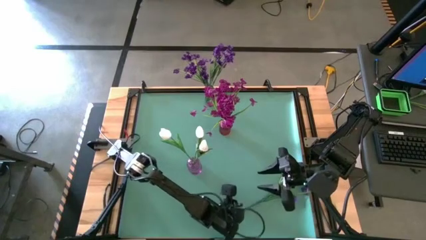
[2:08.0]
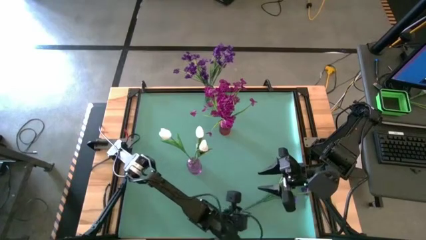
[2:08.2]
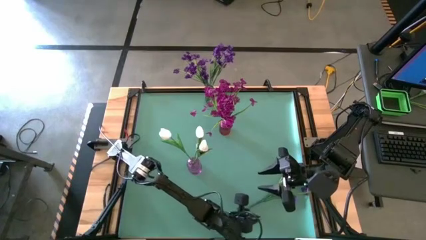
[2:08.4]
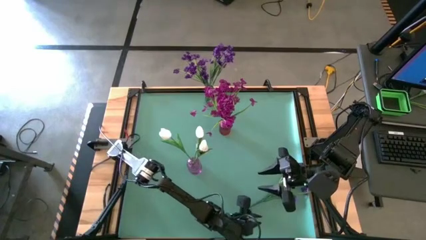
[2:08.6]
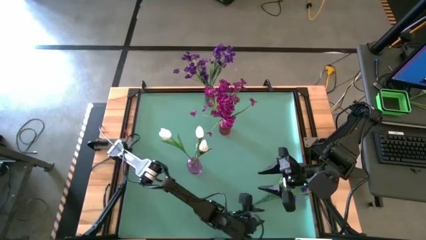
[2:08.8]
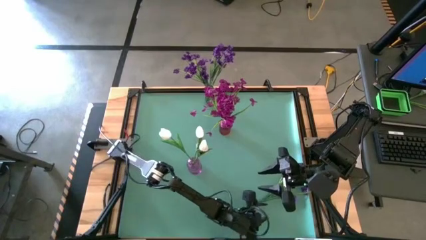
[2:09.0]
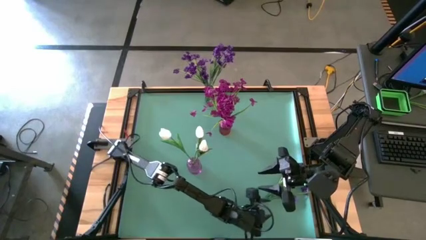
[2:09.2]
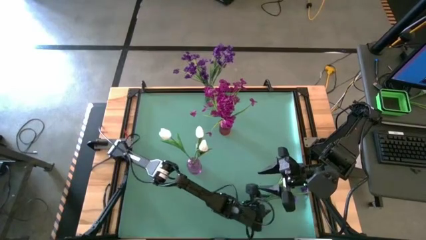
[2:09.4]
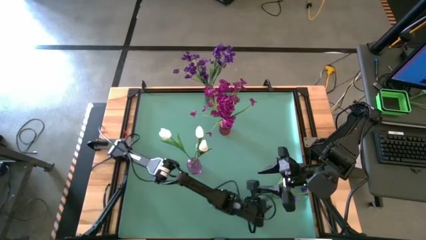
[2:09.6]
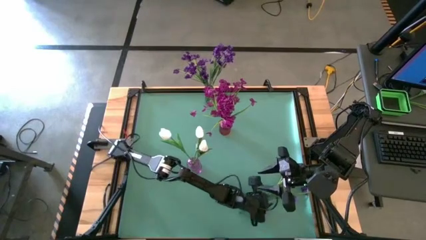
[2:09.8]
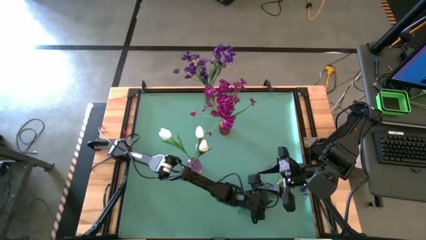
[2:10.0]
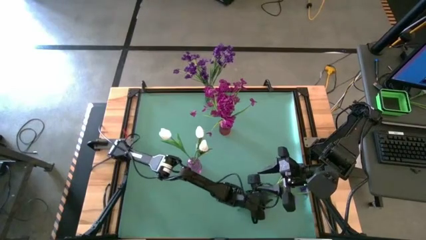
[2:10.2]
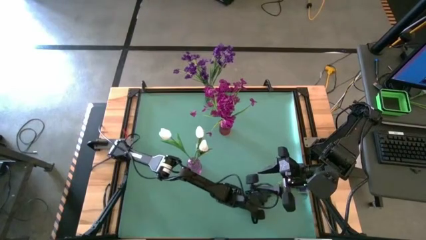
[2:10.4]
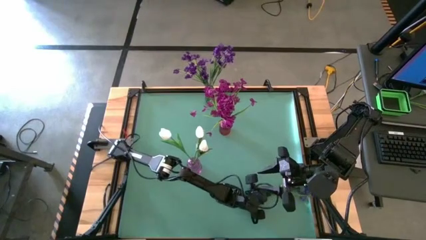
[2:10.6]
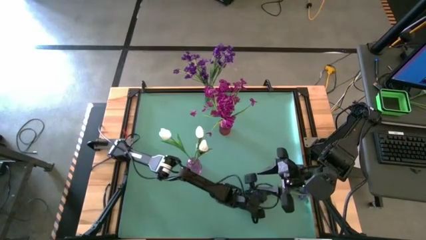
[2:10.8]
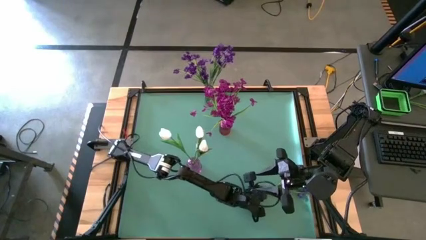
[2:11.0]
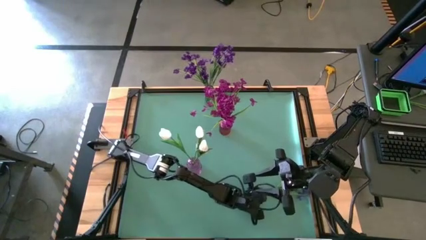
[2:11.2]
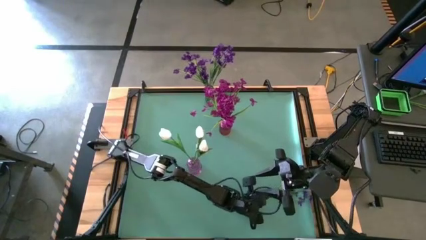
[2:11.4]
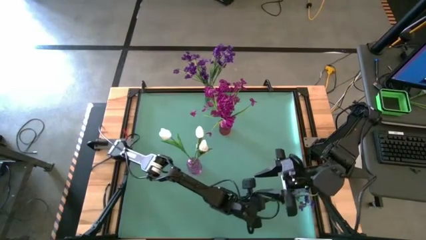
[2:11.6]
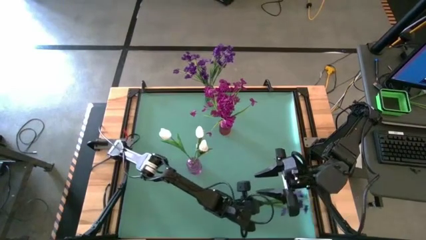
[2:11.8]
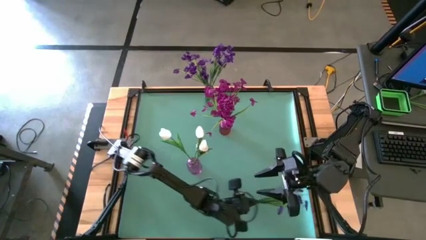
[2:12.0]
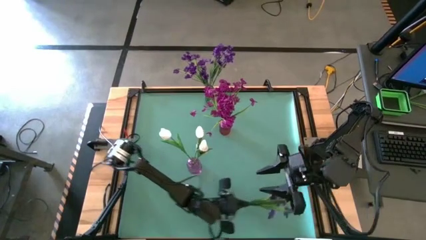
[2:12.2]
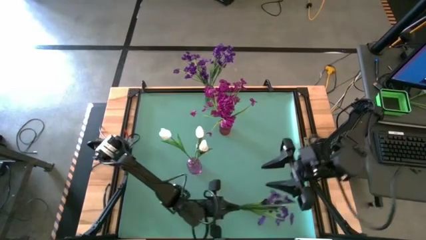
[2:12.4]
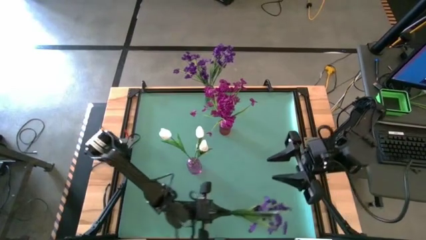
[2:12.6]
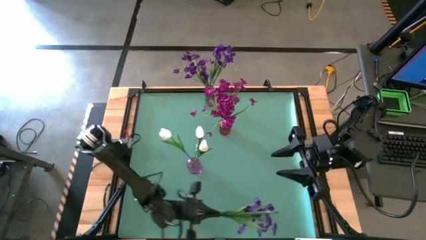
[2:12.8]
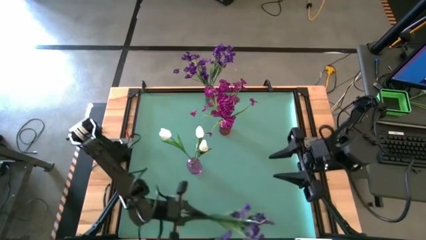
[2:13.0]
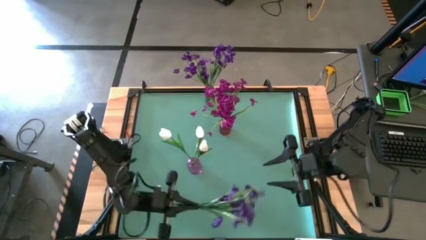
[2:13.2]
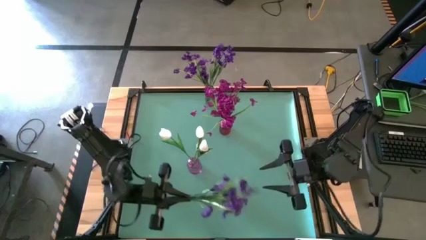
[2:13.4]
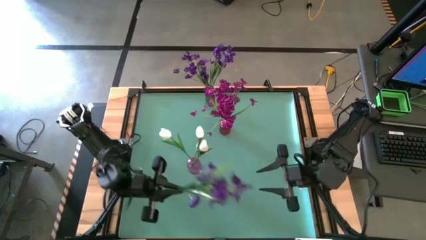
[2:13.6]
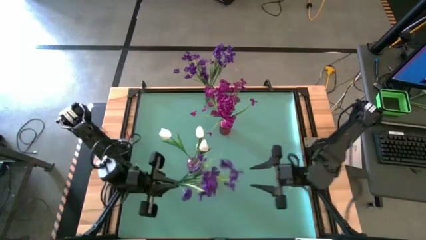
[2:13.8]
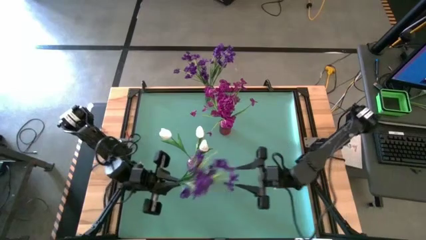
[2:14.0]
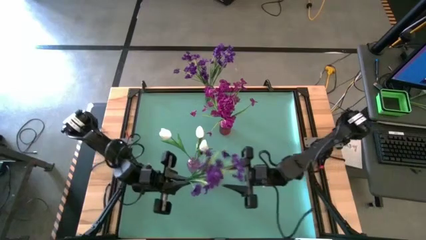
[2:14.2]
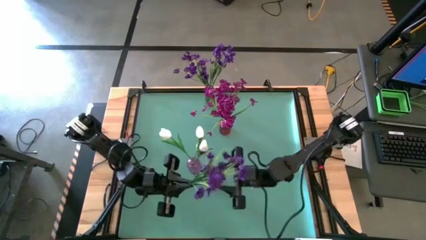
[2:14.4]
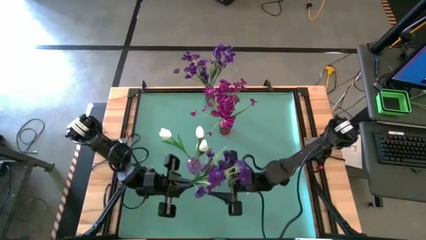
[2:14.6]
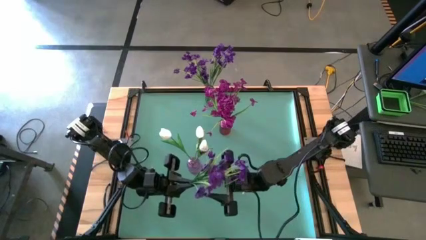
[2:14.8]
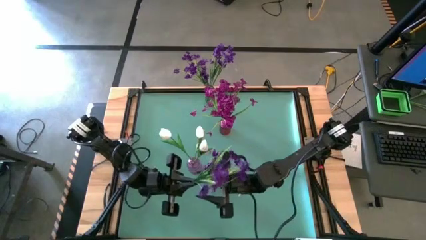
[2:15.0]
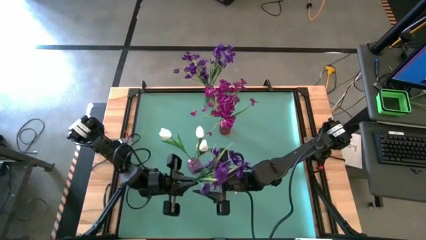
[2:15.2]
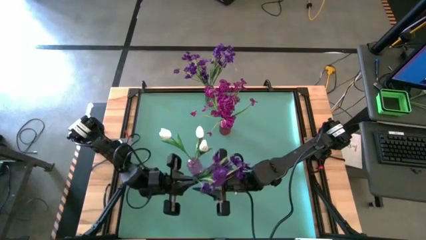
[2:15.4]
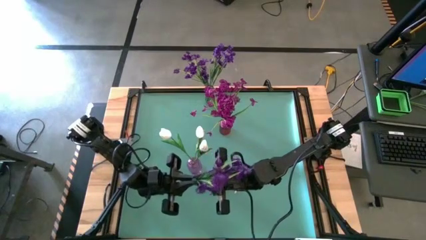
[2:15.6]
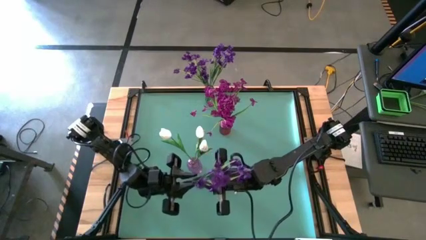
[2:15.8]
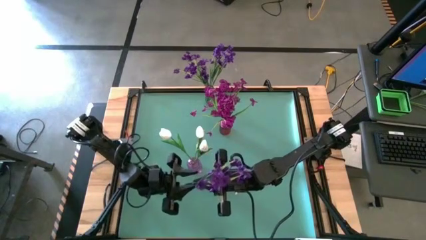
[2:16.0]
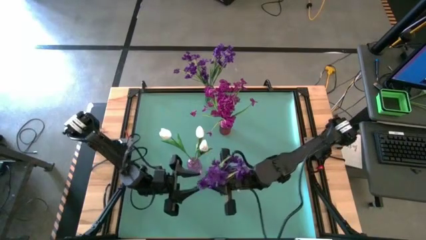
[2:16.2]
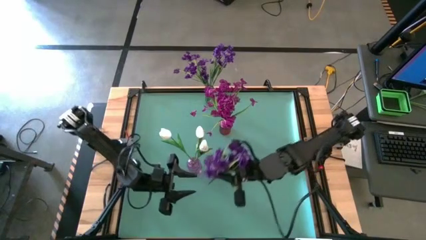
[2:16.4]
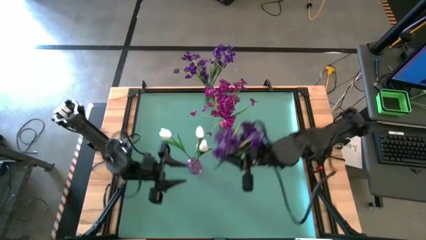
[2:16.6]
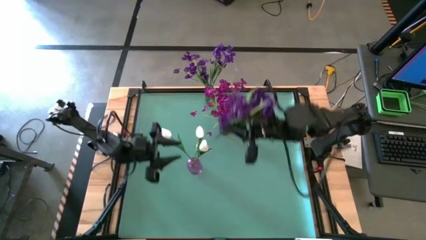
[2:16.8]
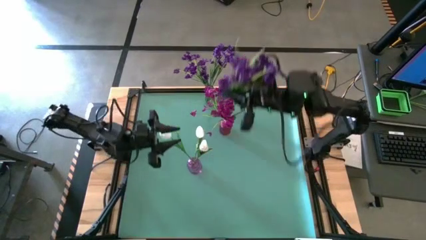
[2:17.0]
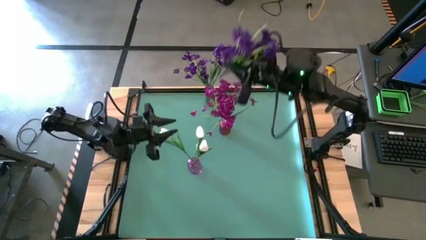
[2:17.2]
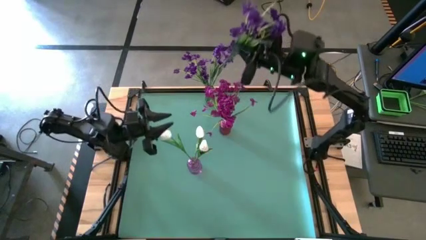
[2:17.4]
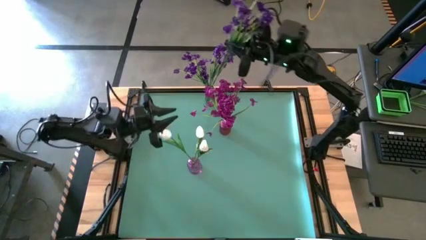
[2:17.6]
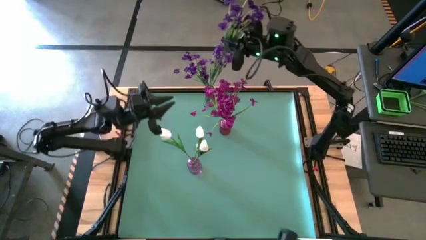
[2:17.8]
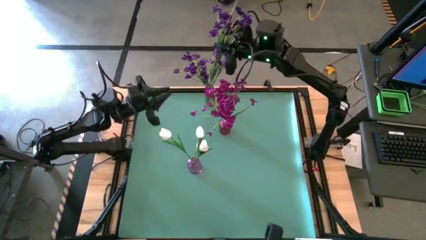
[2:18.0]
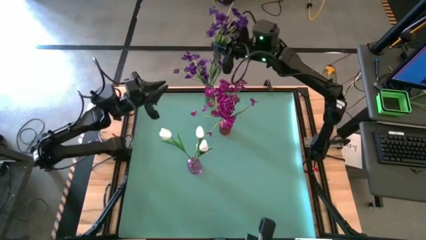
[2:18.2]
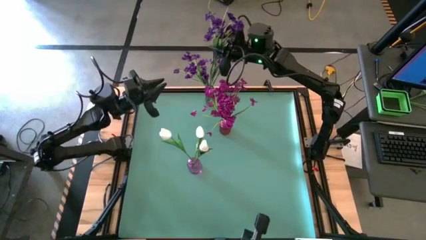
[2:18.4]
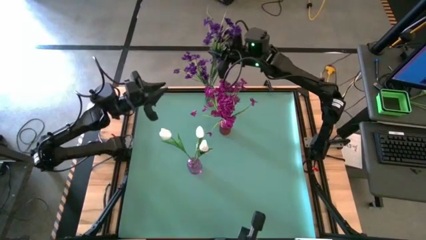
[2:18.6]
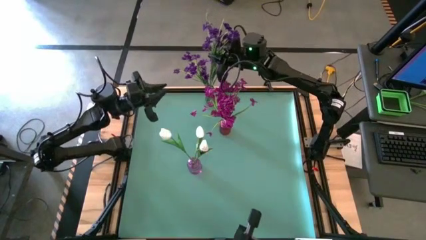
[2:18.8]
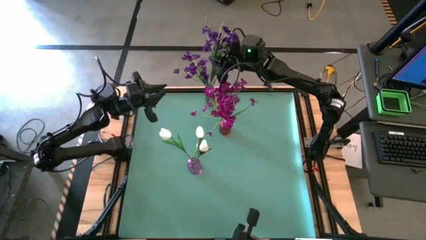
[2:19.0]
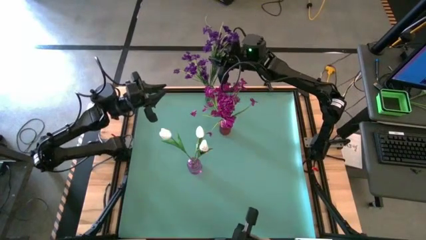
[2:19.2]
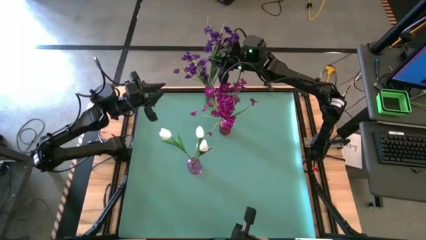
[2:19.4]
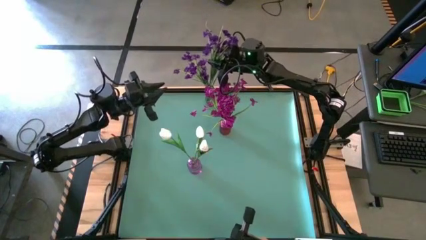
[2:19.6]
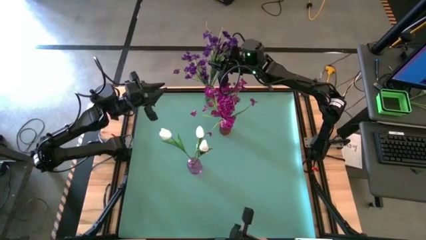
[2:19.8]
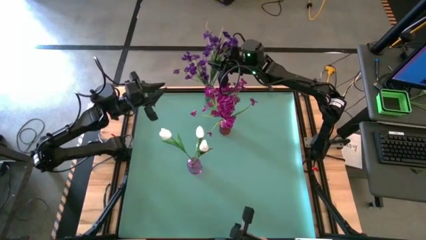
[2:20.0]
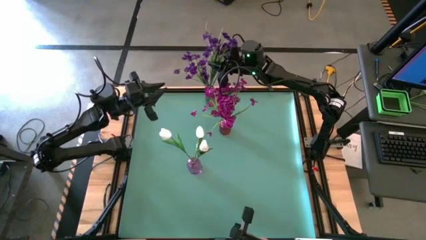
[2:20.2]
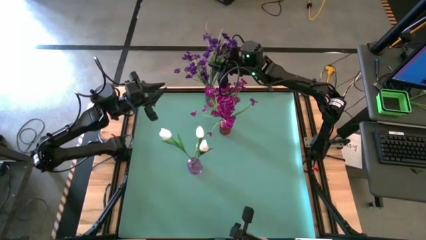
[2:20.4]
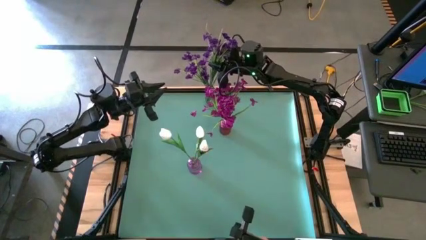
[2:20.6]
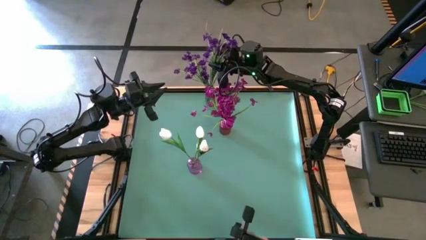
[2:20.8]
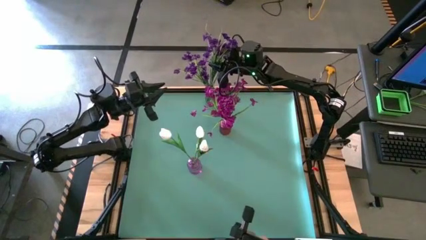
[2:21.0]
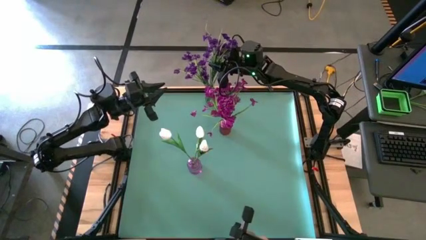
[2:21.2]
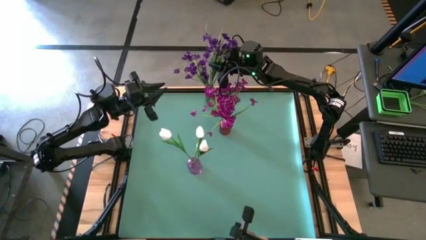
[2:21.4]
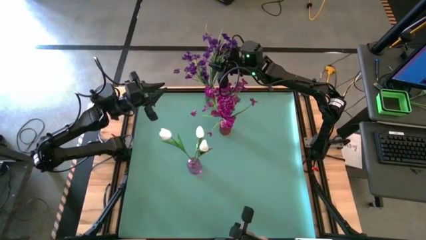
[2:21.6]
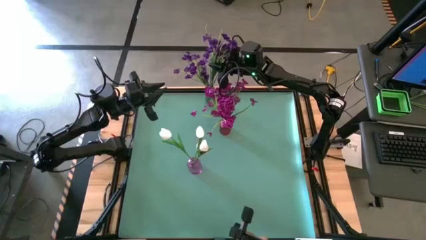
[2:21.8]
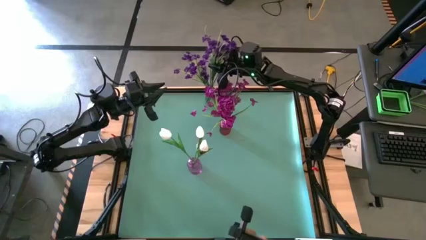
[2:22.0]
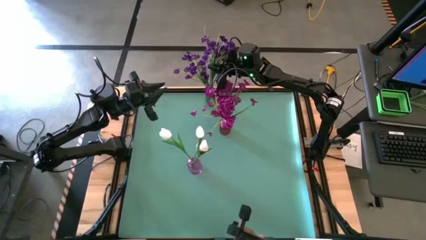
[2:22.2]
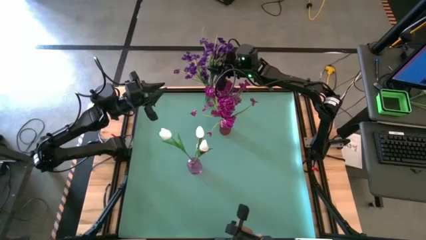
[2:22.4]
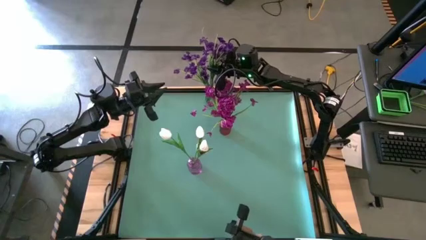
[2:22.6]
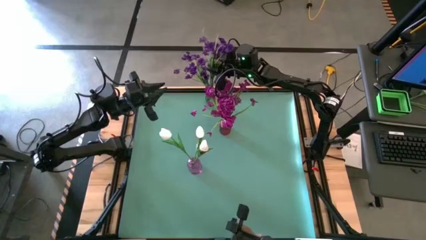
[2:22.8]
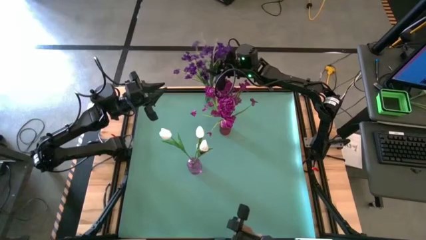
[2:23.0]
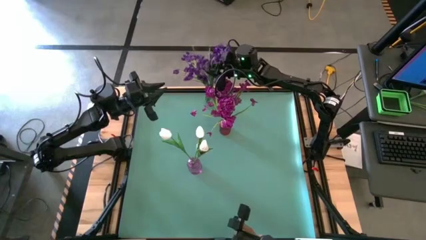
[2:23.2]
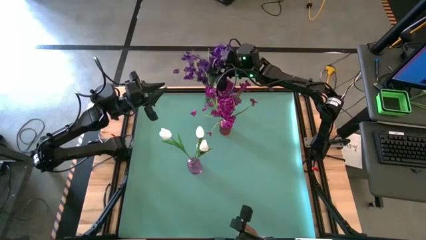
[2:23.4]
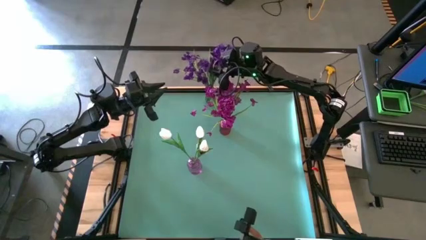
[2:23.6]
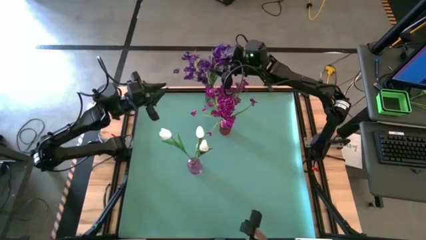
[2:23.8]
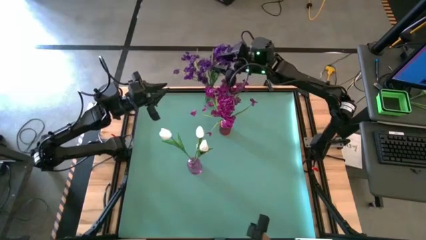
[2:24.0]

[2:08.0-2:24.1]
Task: Sort flowers into vase by color
Put the purple flower into the green vase
